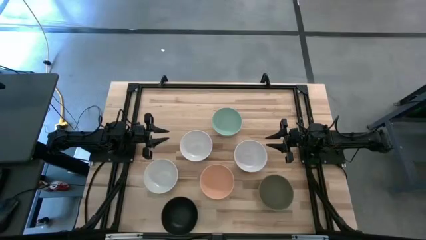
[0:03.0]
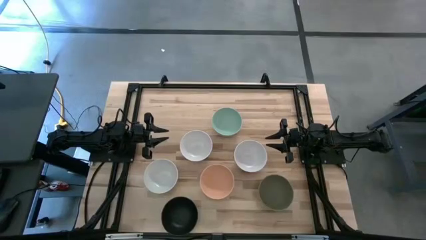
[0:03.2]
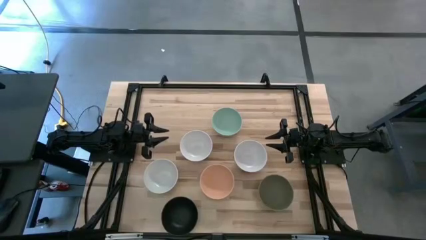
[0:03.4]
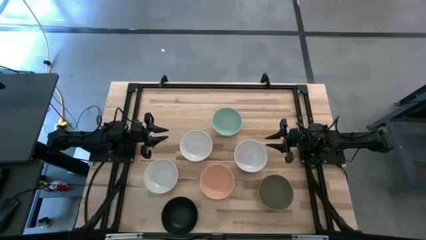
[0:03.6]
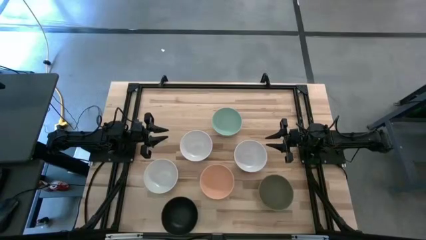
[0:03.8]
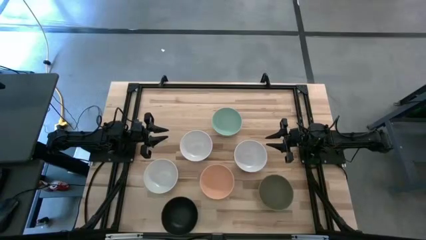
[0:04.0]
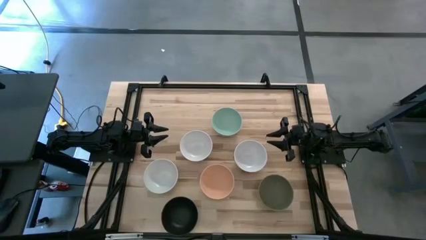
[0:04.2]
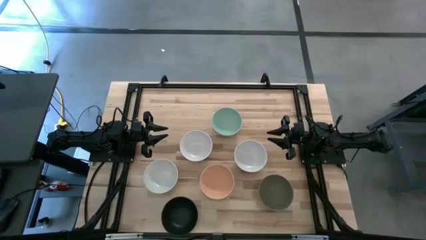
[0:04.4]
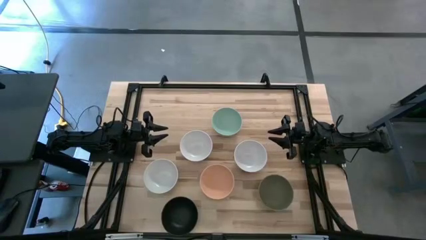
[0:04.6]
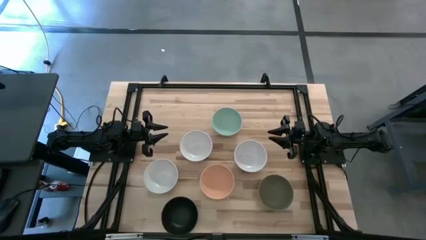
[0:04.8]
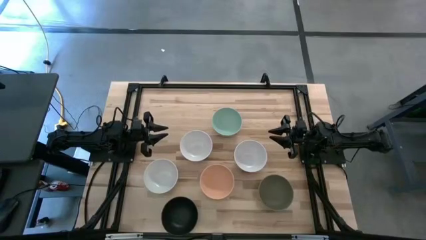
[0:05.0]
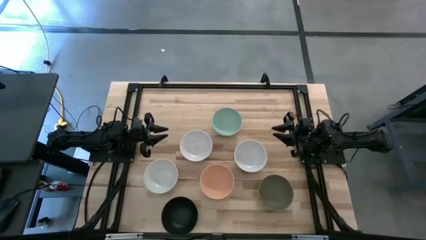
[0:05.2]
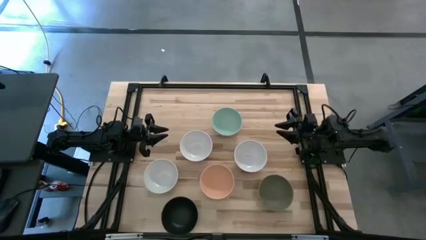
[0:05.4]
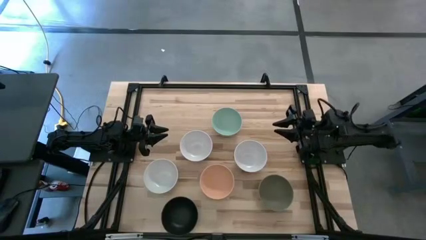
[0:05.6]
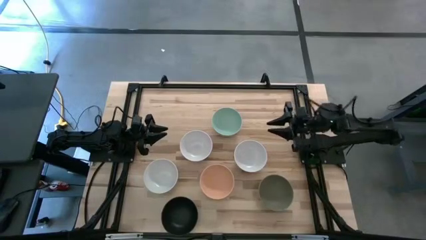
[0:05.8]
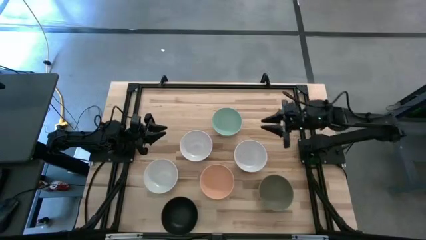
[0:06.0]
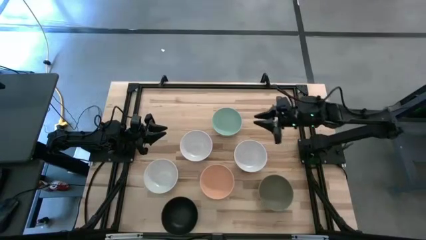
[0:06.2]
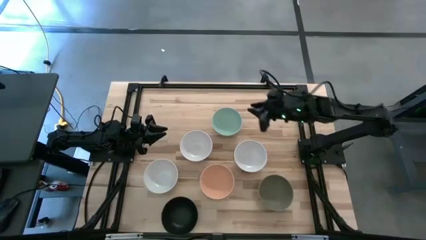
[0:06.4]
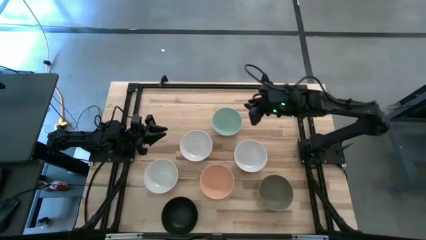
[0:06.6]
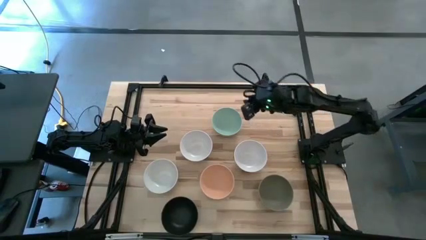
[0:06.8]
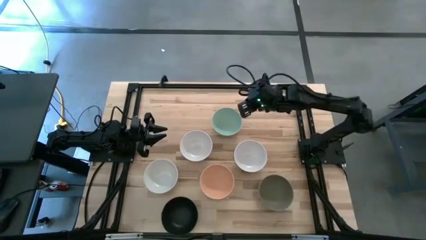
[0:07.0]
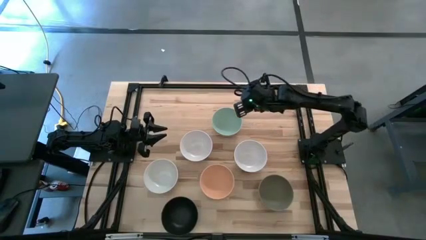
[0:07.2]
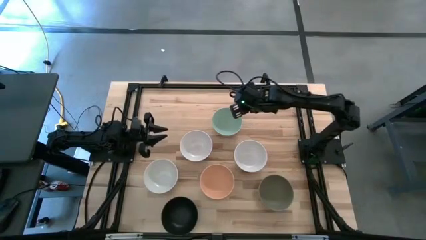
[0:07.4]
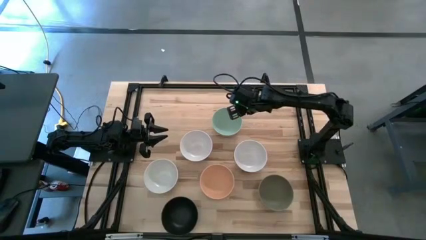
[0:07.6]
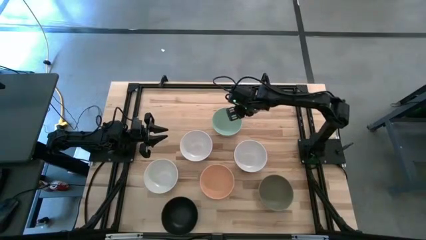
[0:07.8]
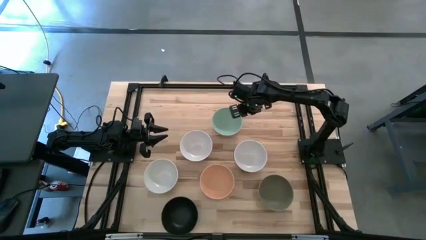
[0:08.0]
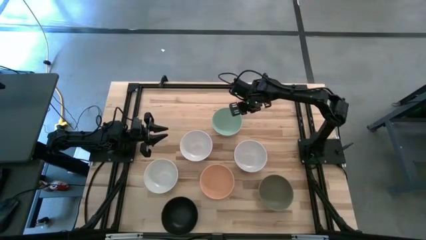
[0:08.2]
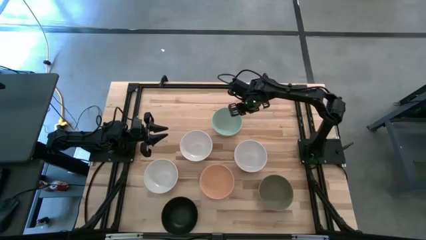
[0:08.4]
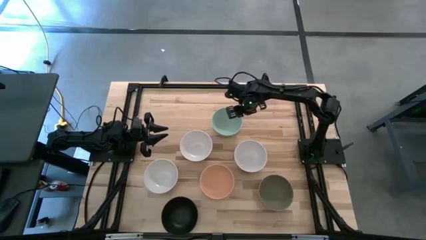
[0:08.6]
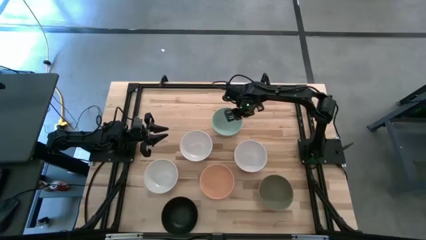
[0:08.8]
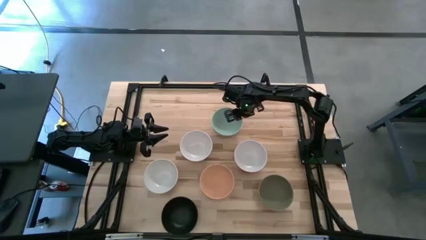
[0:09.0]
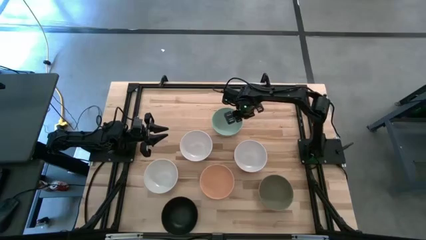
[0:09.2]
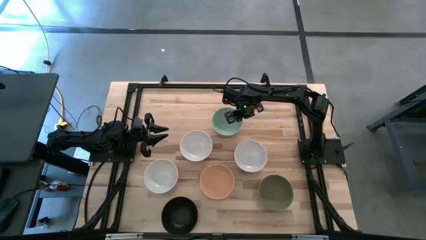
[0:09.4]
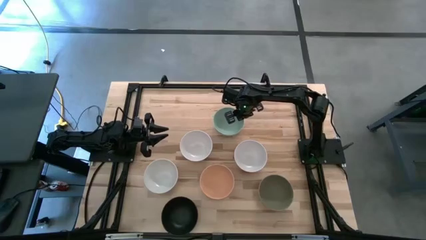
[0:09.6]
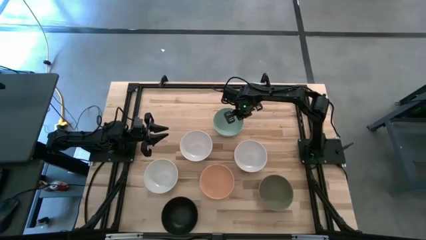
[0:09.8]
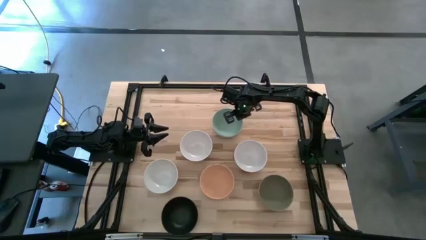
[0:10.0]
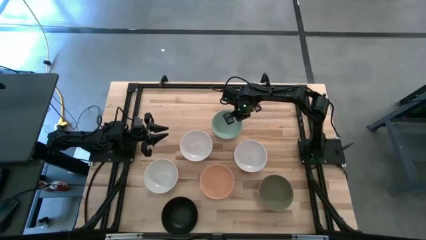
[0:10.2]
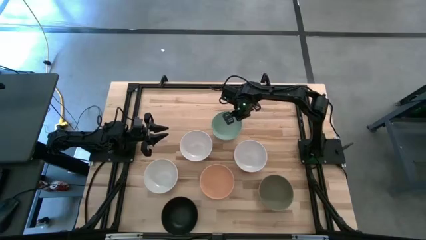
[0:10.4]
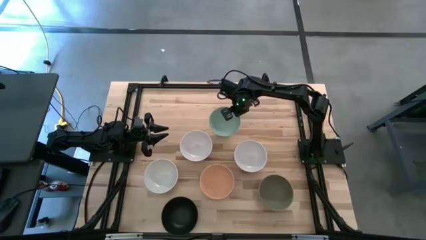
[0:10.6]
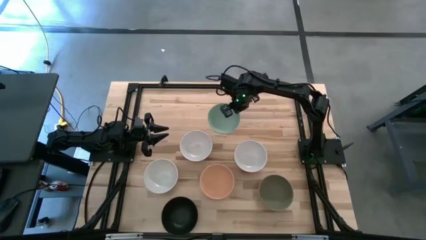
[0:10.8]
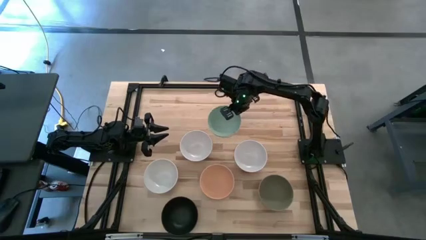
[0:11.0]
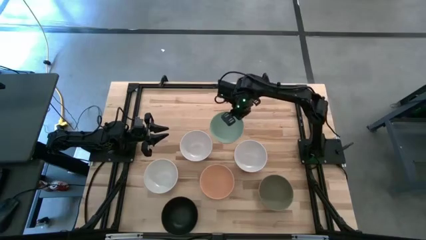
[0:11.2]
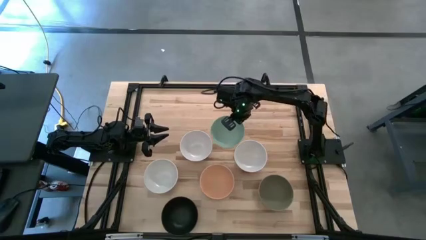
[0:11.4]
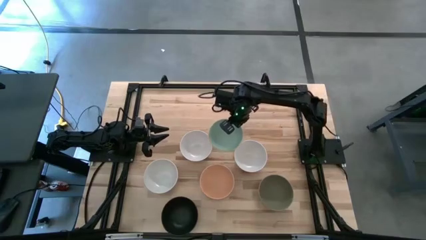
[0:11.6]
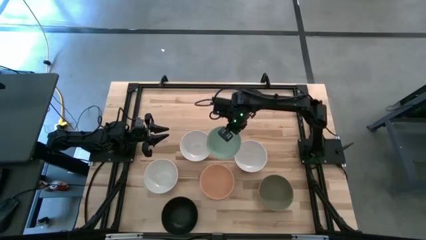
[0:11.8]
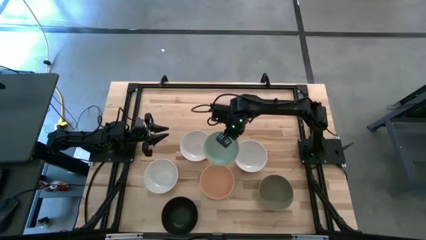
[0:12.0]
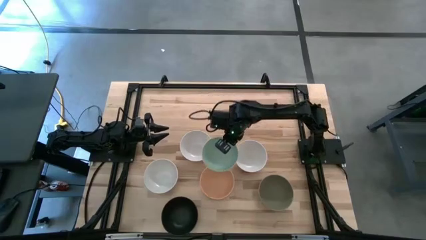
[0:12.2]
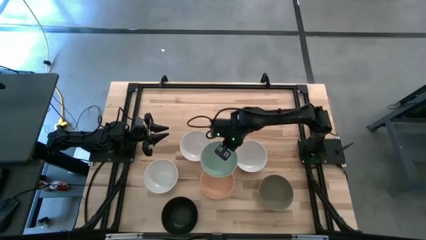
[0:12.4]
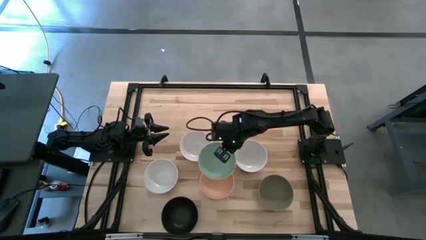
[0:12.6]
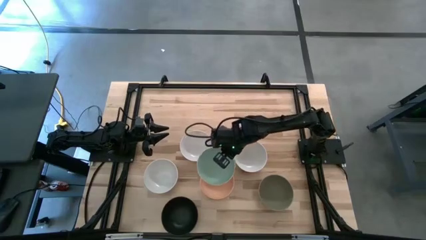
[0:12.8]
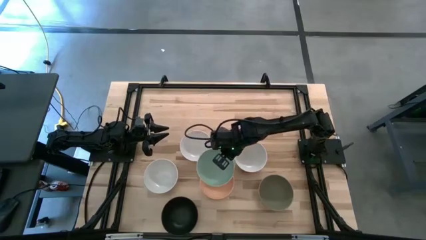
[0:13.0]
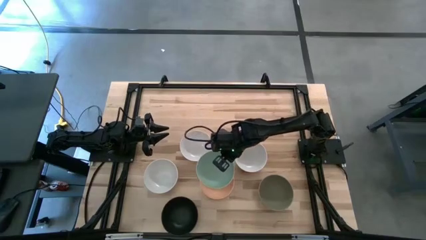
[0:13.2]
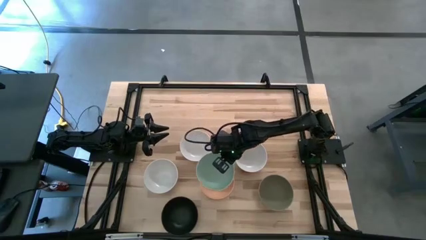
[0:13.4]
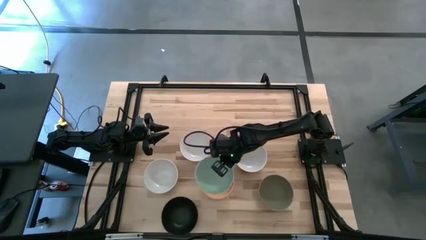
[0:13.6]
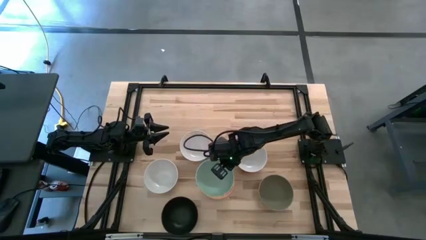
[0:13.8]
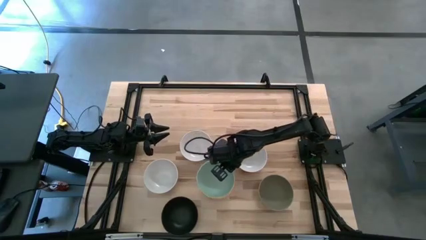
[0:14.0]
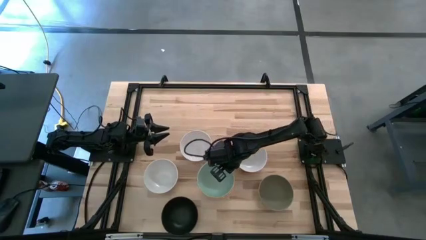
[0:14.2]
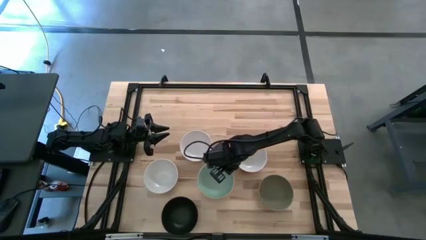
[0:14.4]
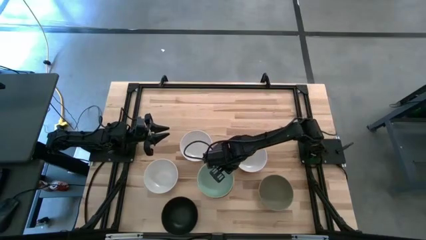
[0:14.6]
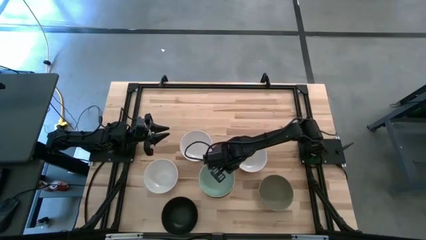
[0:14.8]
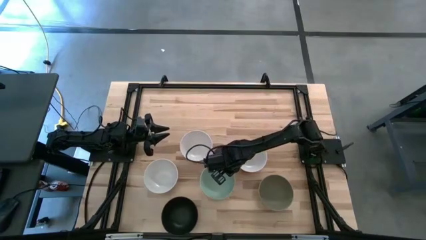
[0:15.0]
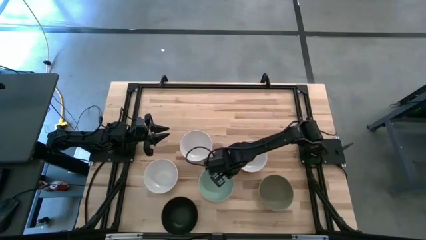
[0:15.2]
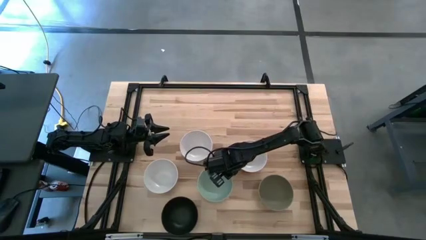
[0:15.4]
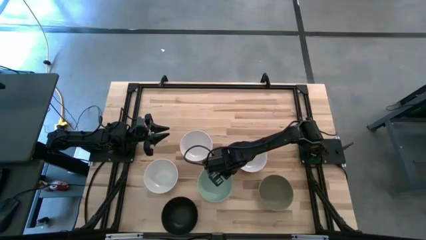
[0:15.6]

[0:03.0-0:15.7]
Task: Nest bowls inside each other
Stack the green bowl on top of the orange bowl
